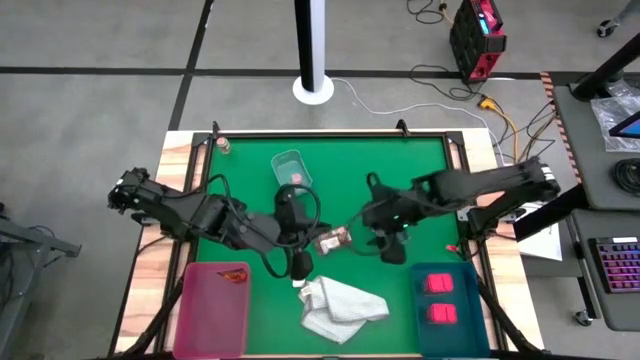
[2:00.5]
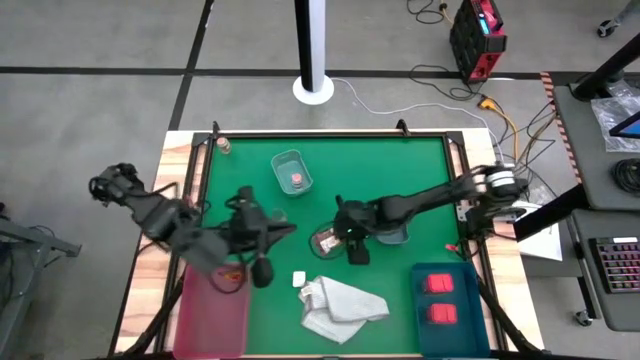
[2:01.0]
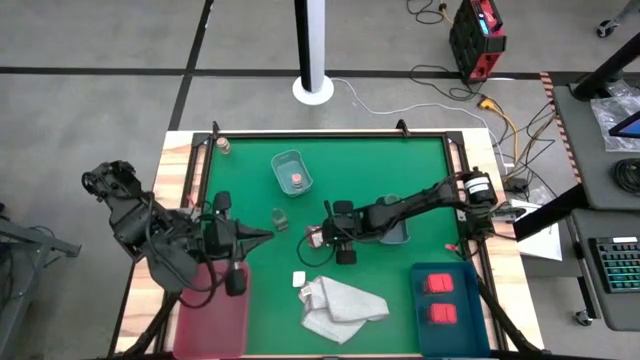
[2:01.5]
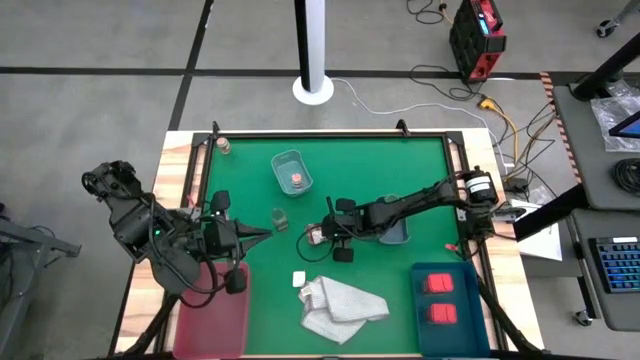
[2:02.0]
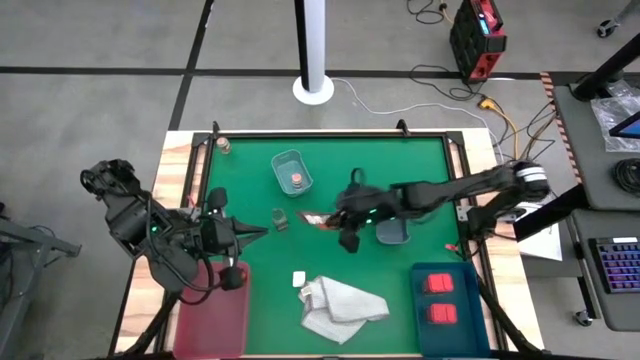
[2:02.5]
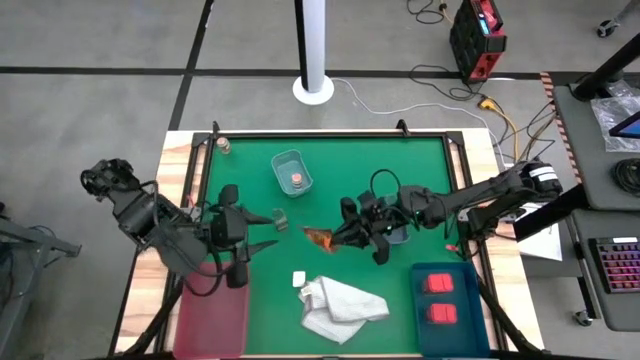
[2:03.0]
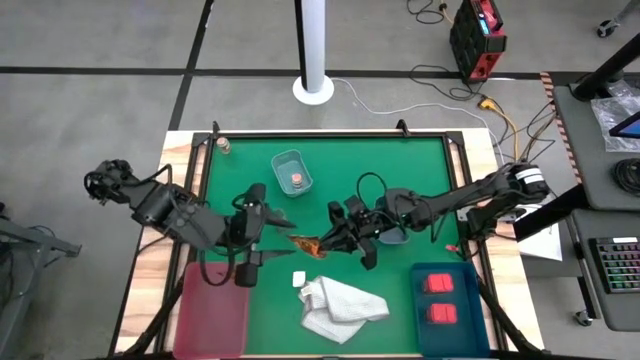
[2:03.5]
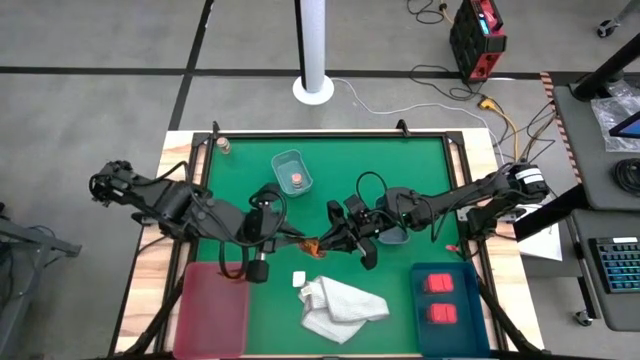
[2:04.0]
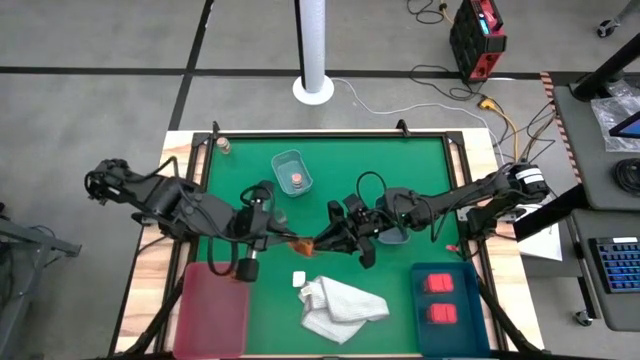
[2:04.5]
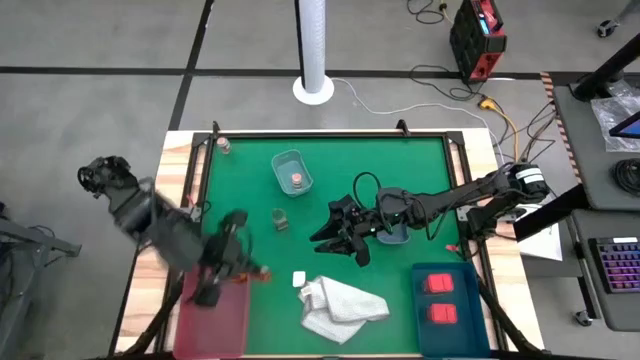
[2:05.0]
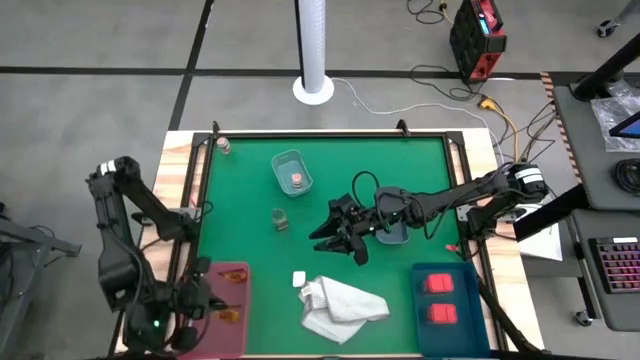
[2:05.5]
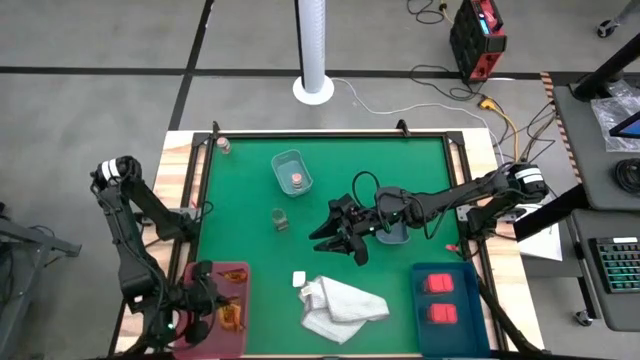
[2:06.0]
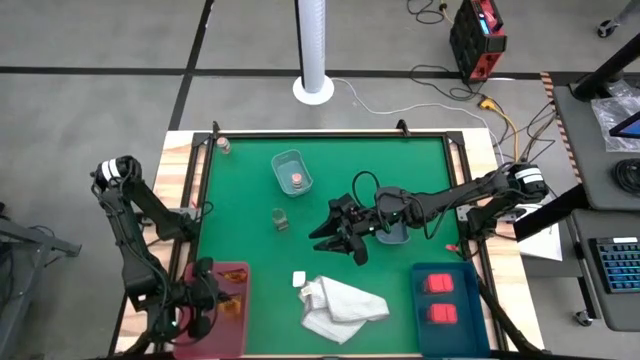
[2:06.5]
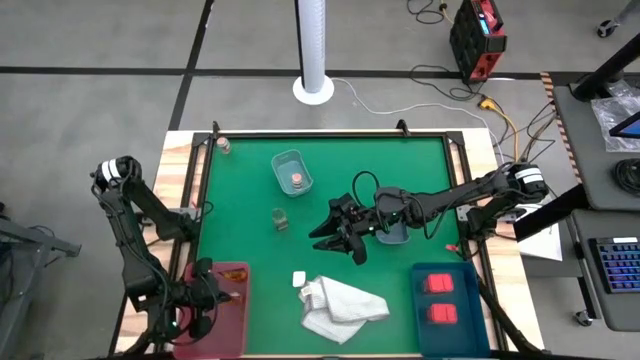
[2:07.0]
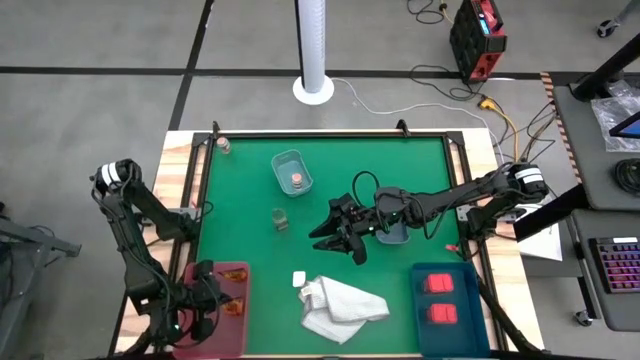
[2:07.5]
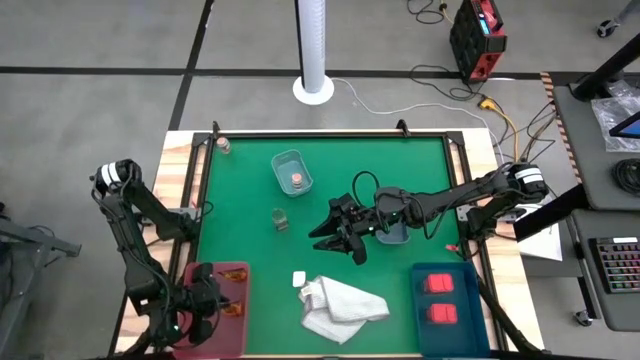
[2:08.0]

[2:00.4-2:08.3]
Task: Sort spices by type
Put the orange spice pack into the pink bin

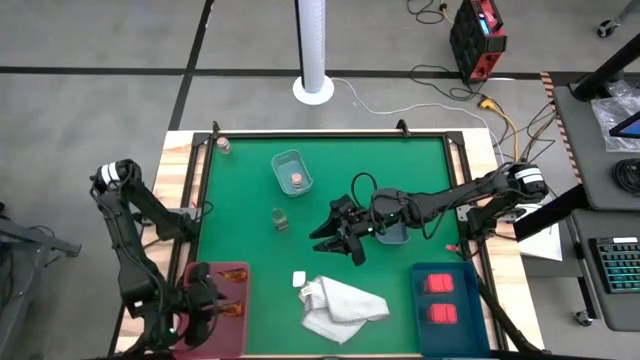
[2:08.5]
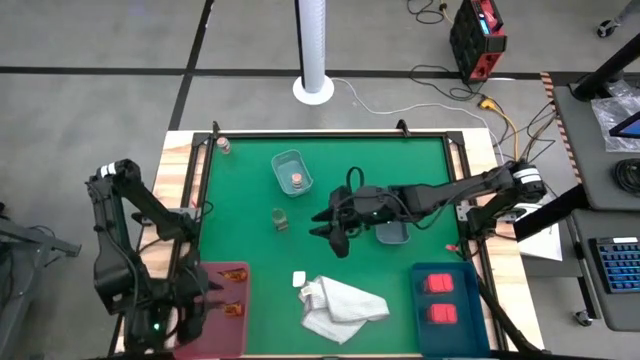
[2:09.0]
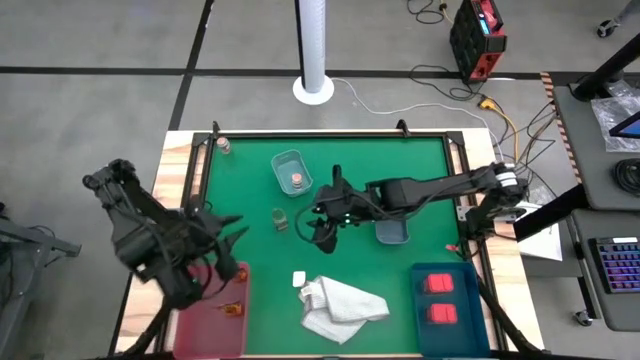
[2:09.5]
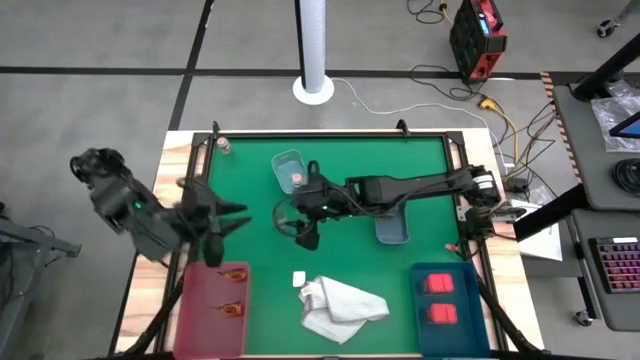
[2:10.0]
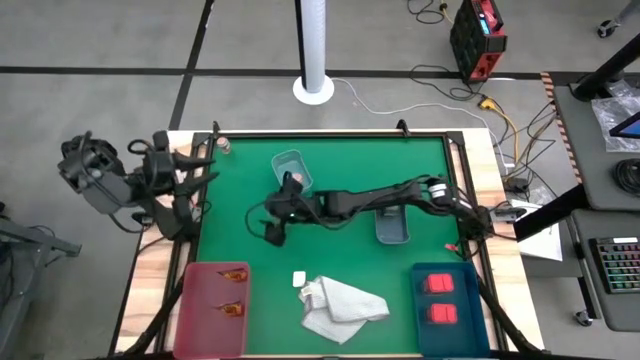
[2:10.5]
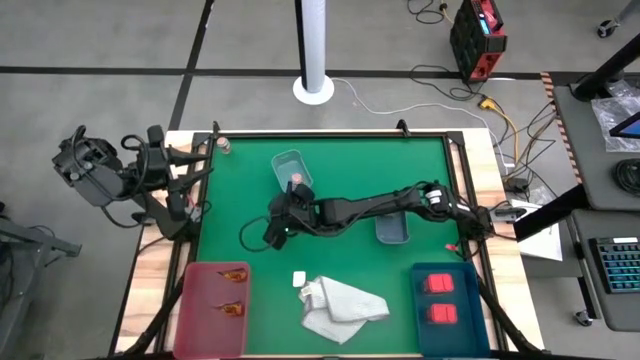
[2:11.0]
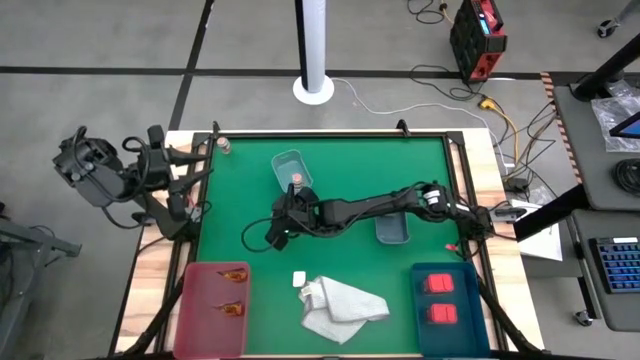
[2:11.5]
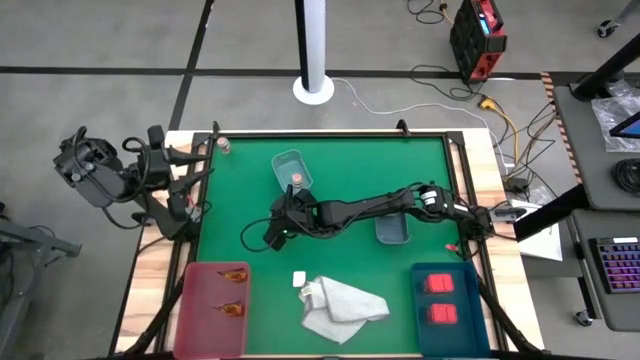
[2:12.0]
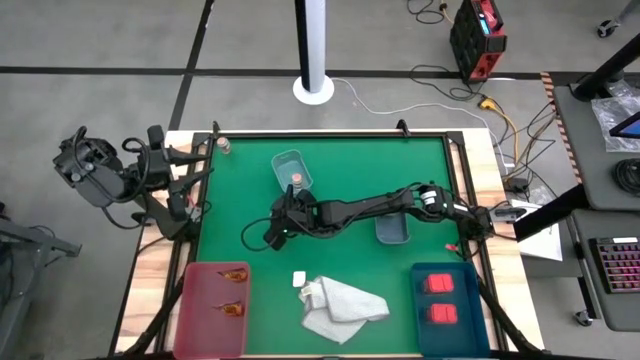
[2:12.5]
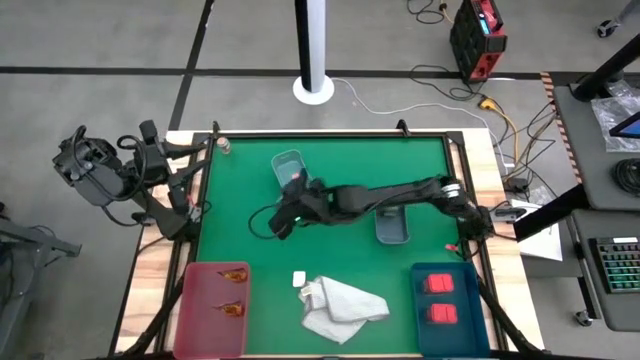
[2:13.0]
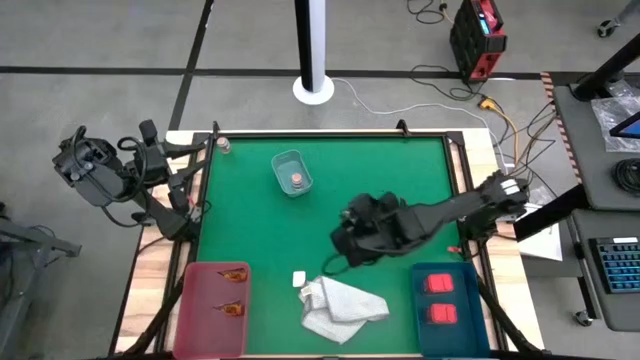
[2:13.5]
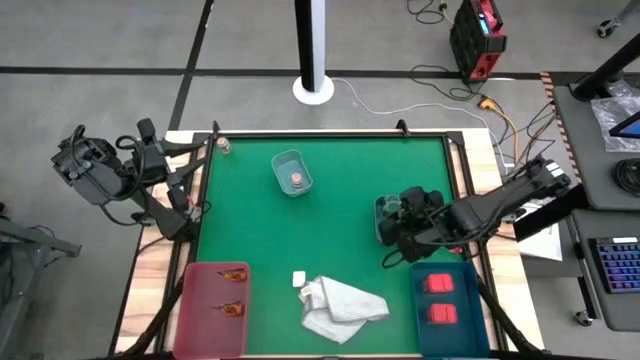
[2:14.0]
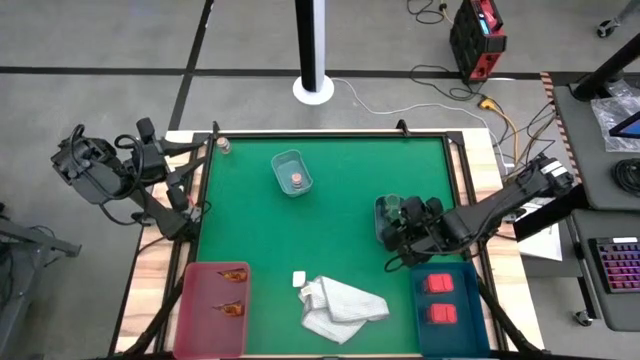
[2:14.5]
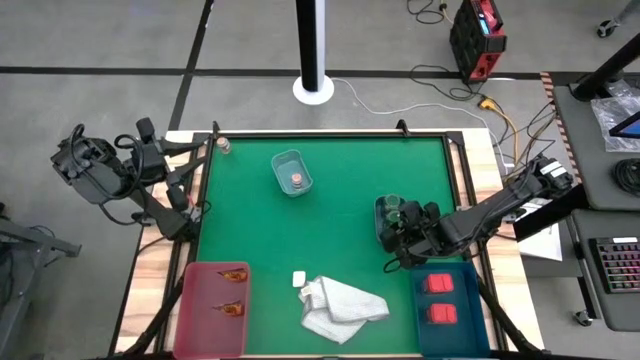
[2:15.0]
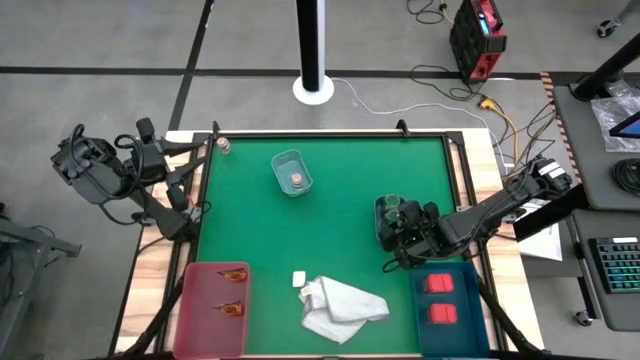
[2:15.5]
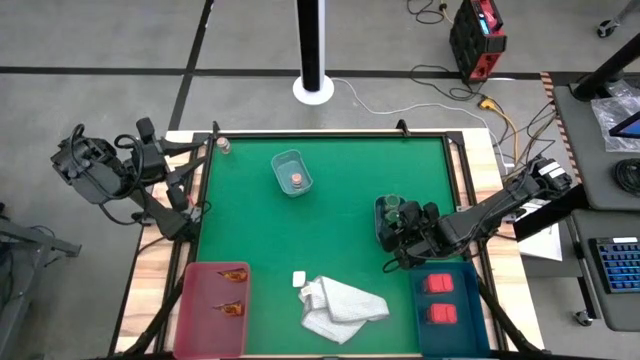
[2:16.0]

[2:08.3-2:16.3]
Put the green spice bottle into the blue bin

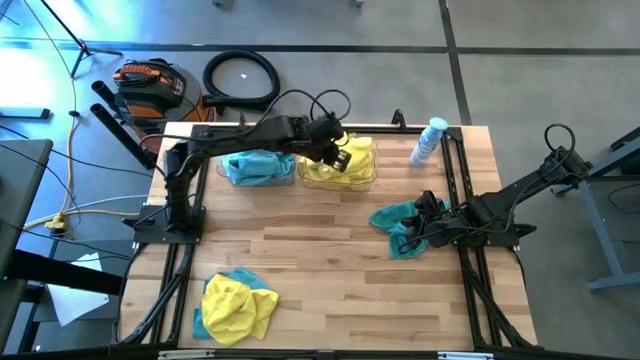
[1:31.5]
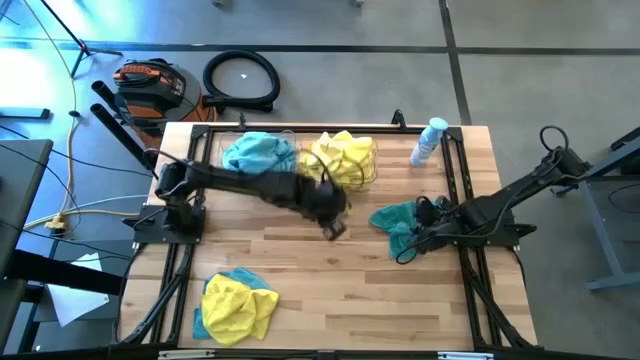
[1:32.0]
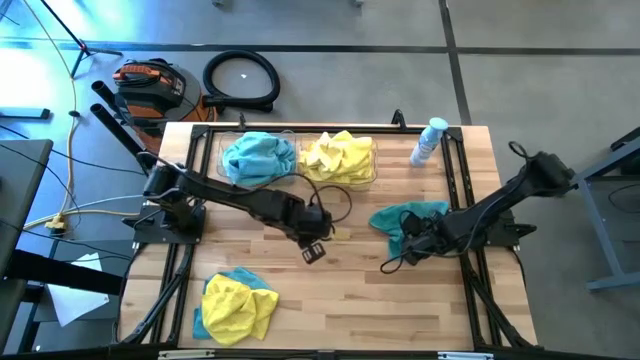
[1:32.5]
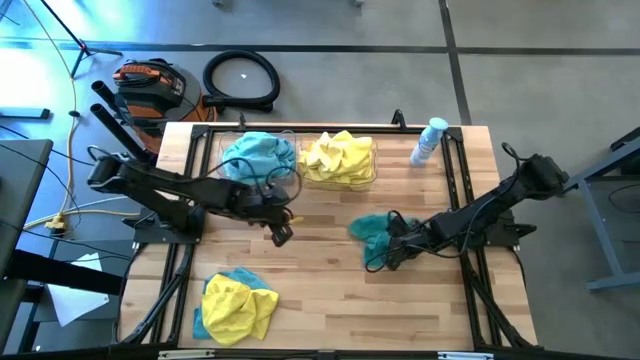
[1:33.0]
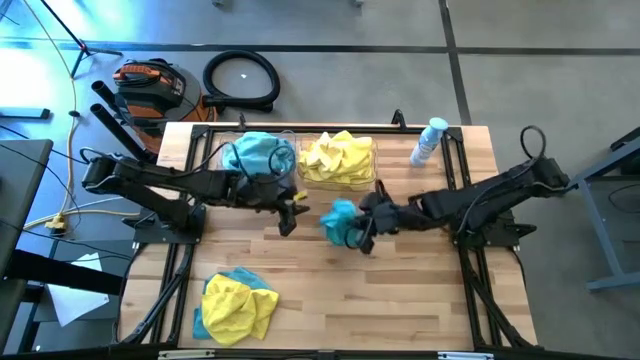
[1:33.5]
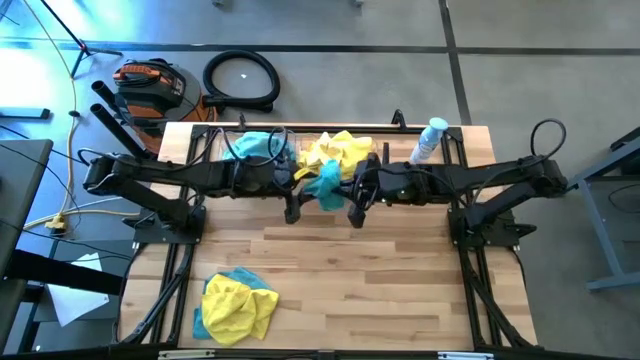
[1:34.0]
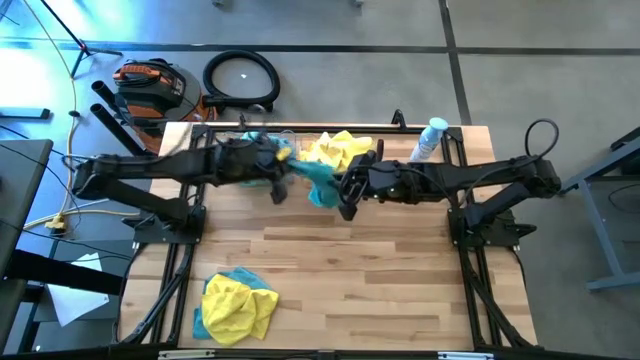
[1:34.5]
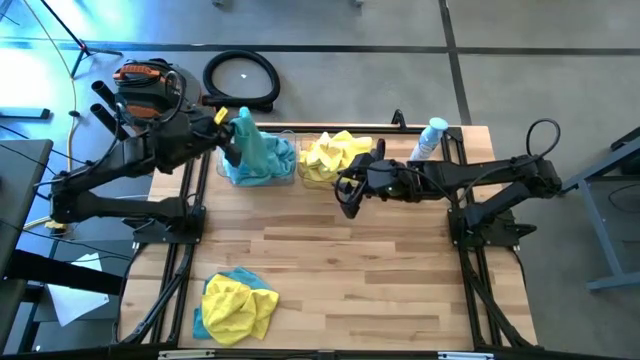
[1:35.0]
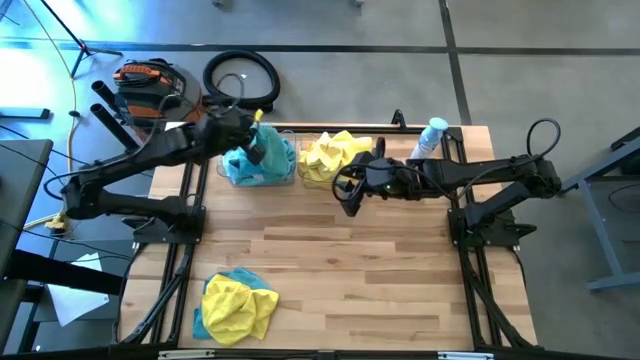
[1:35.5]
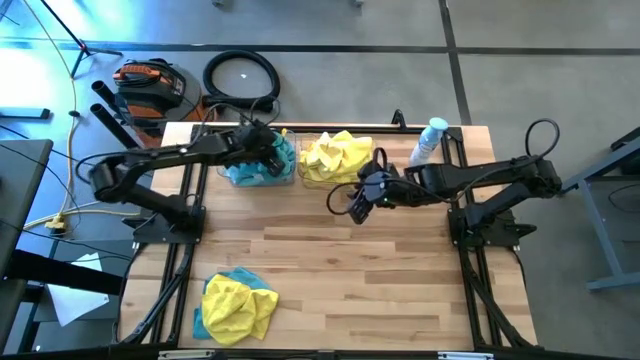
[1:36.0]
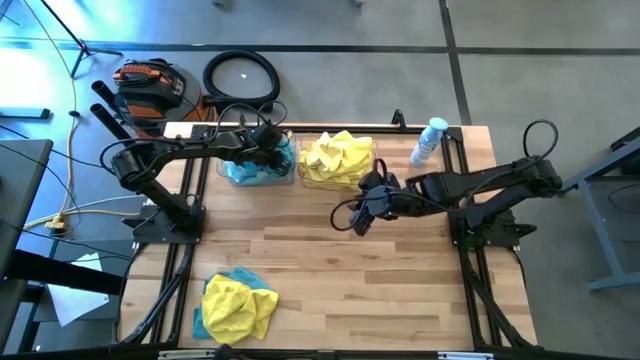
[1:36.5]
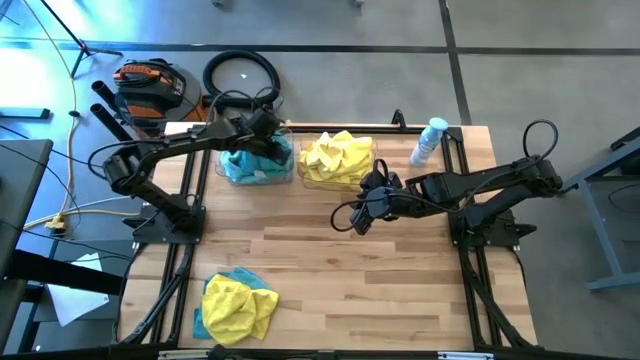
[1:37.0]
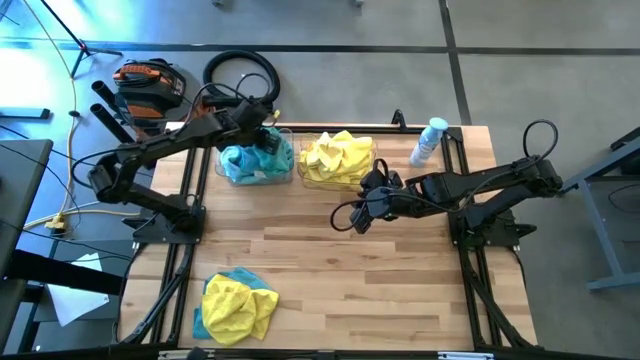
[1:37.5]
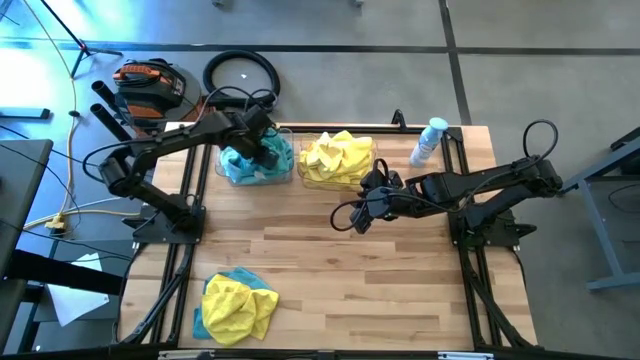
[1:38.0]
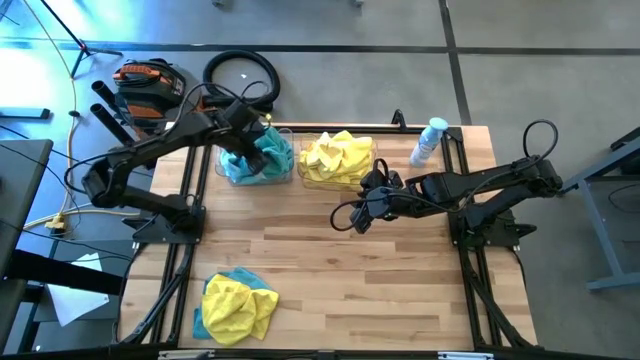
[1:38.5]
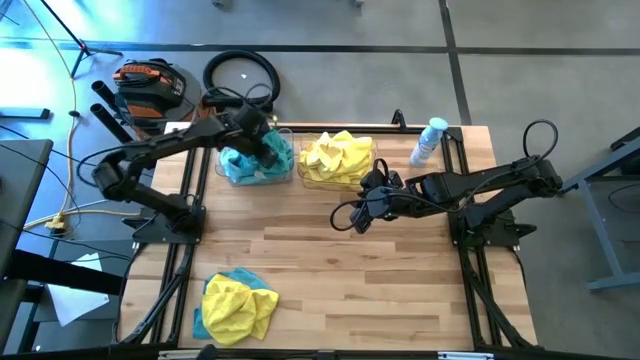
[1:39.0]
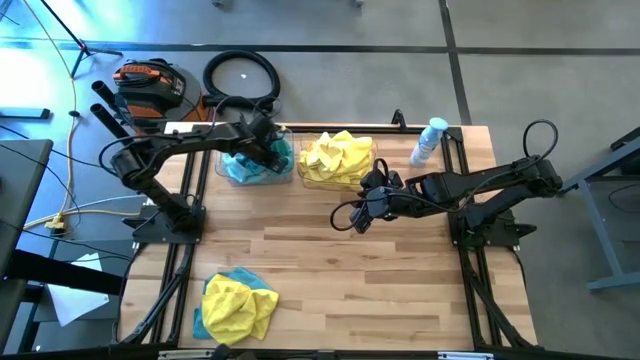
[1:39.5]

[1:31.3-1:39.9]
Task: Sort microfiber towel by color & place in baskets
Put the blue towel into the left transparent bin
